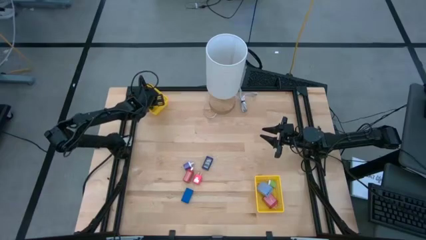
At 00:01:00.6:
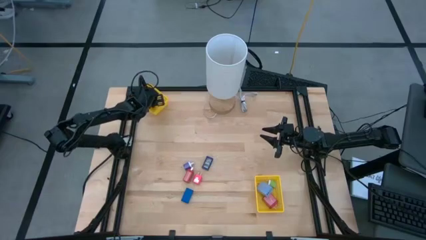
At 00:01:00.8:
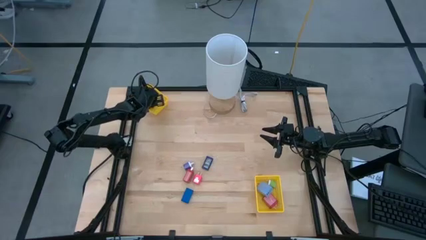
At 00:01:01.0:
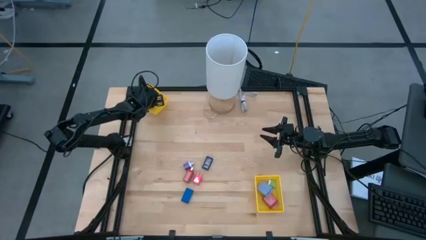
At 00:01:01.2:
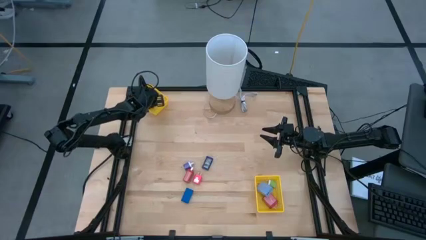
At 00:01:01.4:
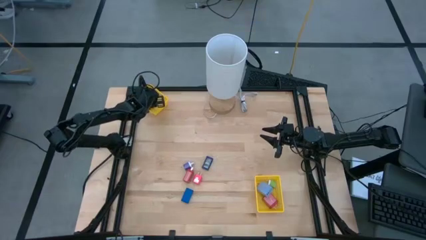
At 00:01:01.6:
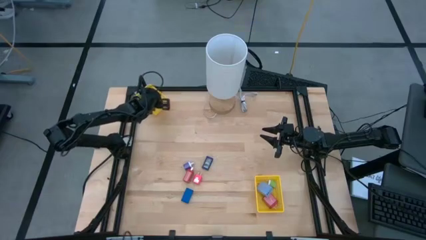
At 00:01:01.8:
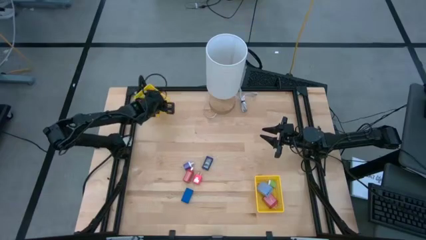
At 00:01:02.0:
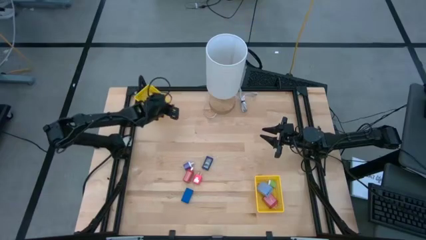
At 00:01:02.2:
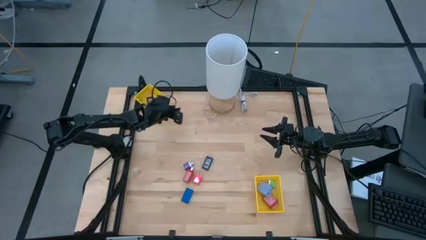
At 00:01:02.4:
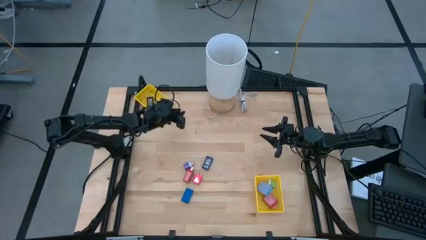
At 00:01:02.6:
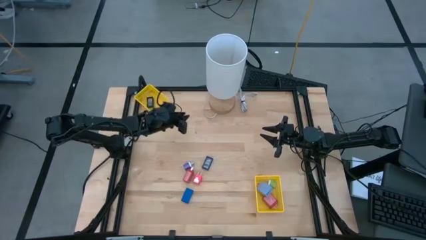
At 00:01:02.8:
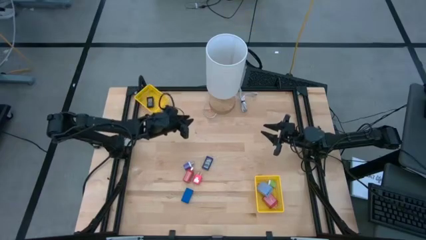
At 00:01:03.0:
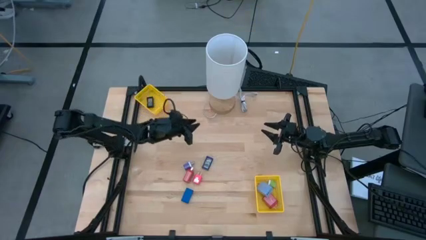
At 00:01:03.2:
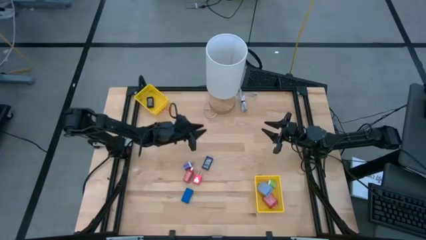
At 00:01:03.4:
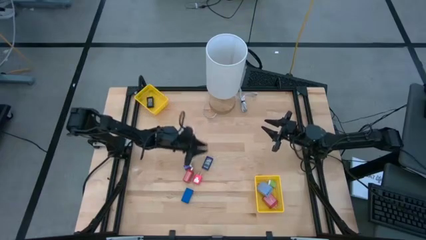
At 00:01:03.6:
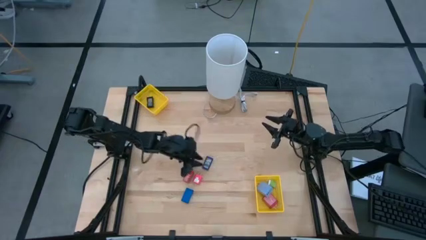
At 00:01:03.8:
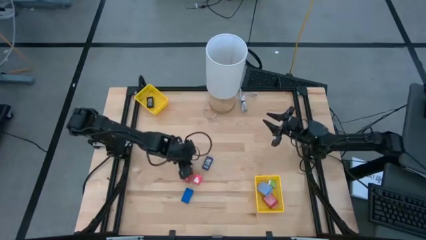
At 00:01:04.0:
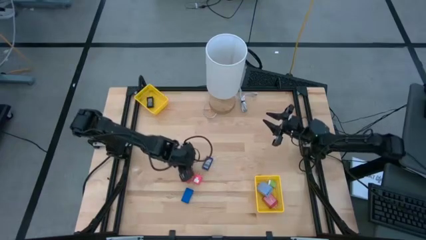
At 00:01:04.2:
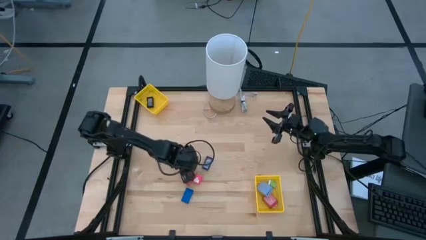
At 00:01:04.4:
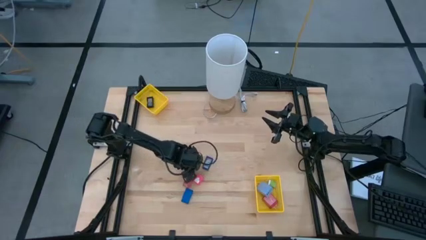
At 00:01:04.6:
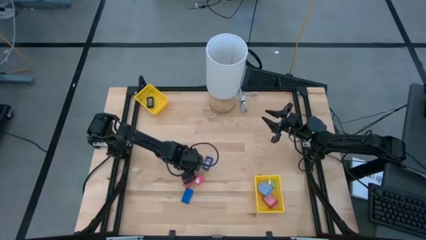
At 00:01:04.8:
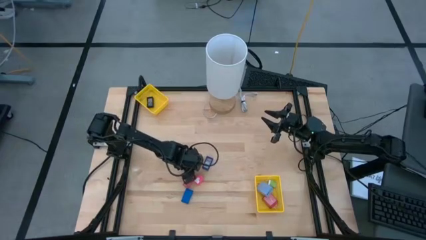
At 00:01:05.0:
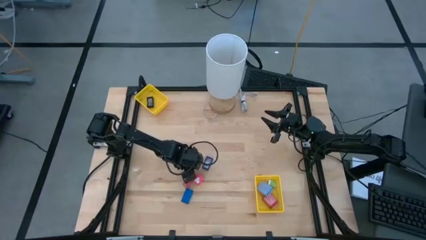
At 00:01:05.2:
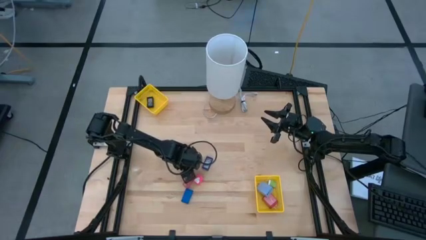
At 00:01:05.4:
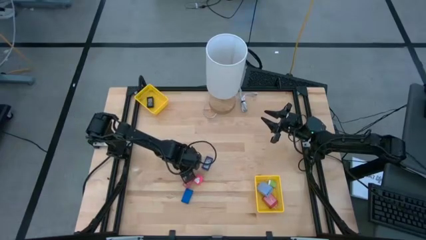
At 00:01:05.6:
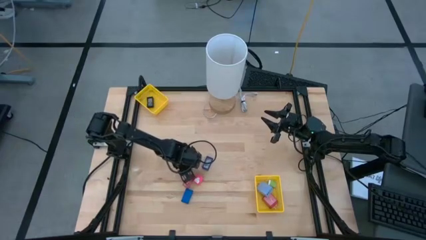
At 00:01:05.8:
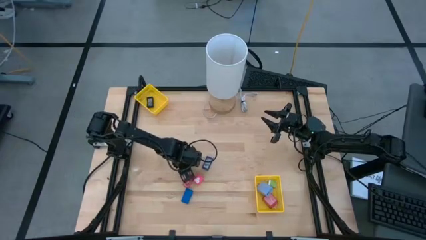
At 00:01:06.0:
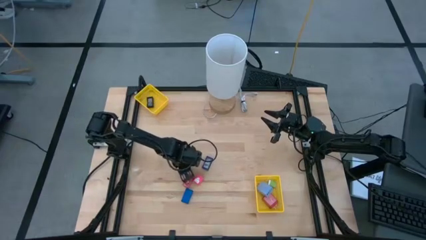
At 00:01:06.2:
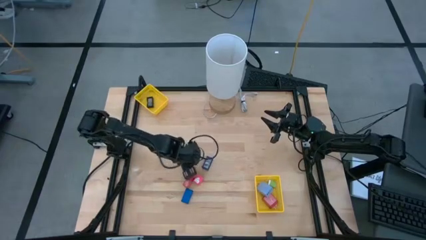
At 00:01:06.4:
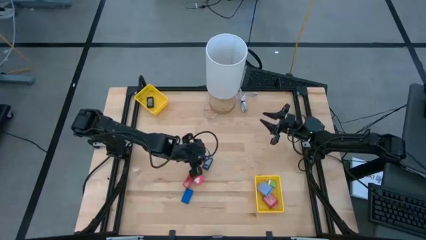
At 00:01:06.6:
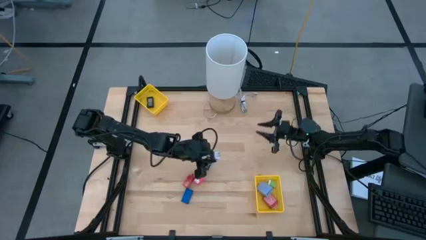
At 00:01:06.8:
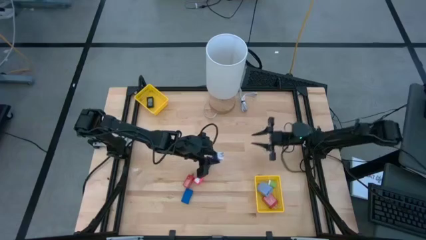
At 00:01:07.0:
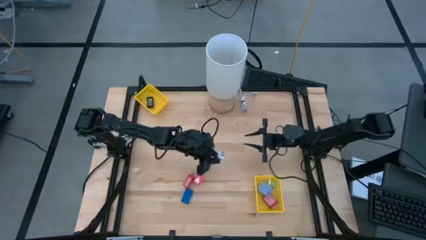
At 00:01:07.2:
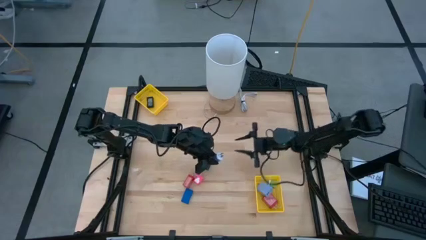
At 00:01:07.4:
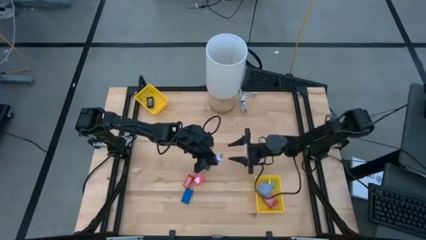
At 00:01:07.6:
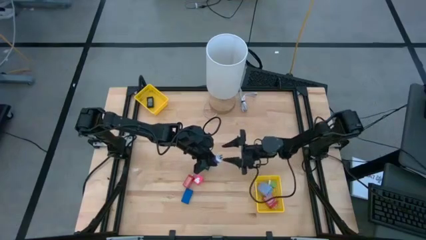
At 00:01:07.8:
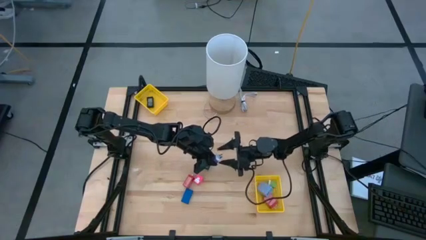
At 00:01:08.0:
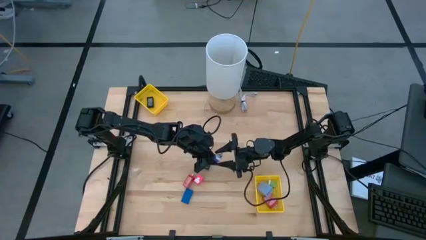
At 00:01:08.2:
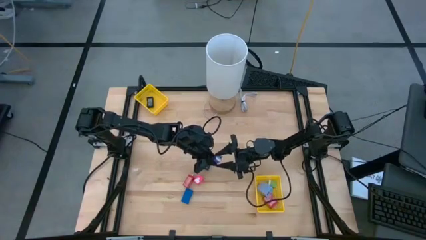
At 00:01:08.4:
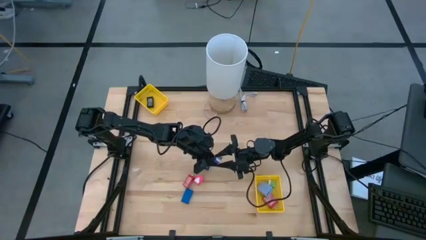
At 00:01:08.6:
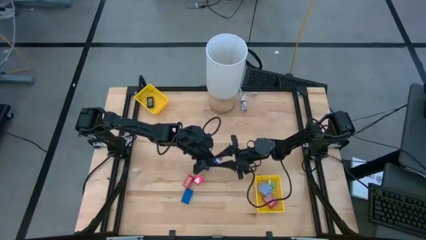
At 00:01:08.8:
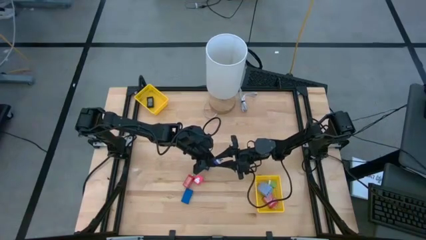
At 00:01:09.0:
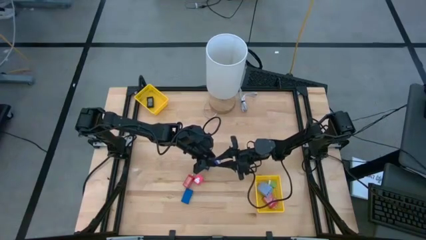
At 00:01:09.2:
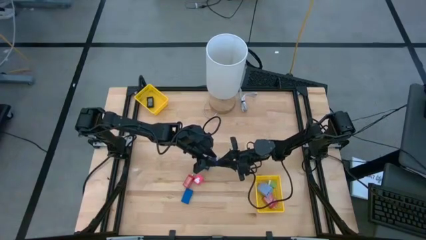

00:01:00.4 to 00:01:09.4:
Task: Pick & Place Office items
Put the violet charger adapter into the bottom yellow bin

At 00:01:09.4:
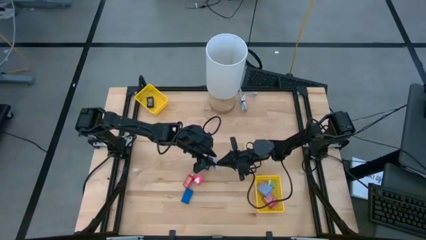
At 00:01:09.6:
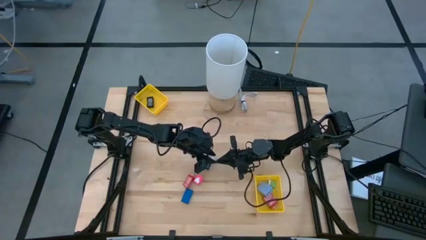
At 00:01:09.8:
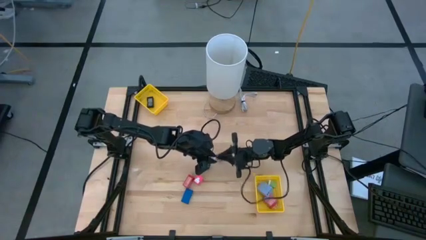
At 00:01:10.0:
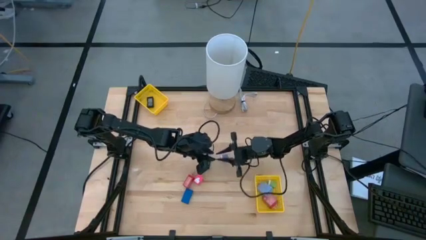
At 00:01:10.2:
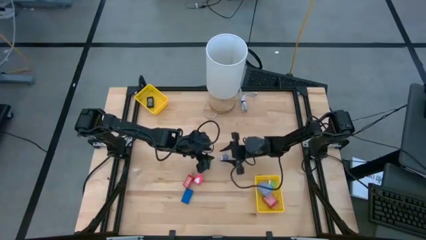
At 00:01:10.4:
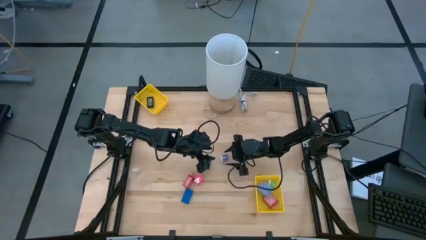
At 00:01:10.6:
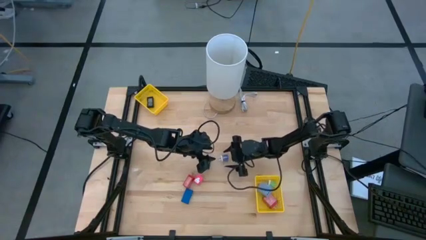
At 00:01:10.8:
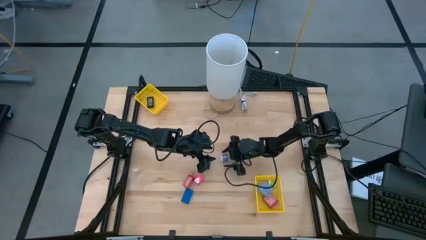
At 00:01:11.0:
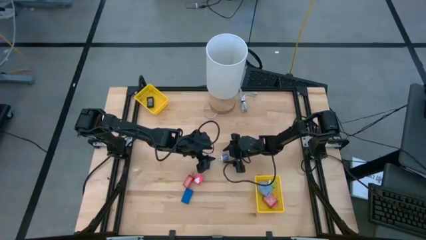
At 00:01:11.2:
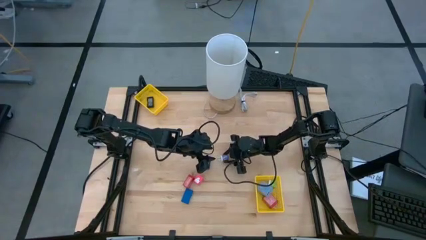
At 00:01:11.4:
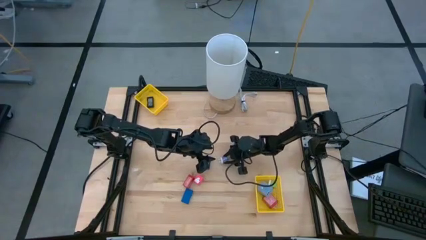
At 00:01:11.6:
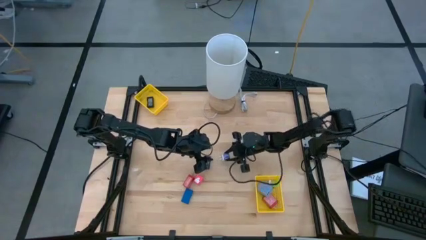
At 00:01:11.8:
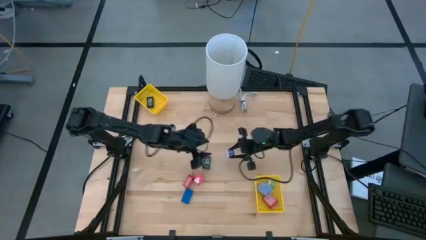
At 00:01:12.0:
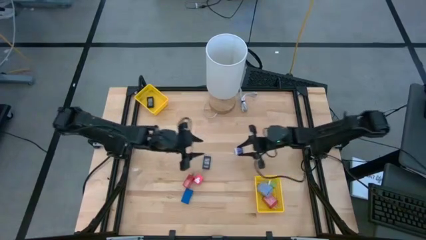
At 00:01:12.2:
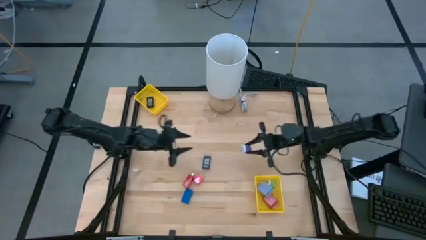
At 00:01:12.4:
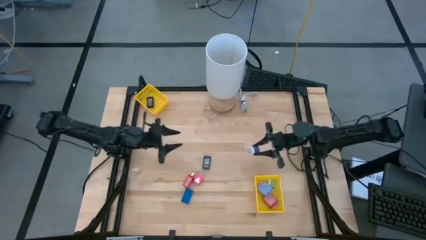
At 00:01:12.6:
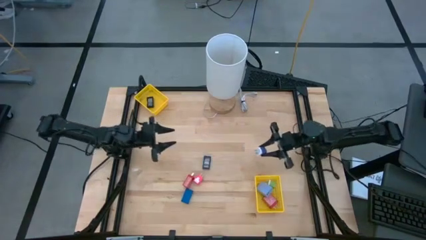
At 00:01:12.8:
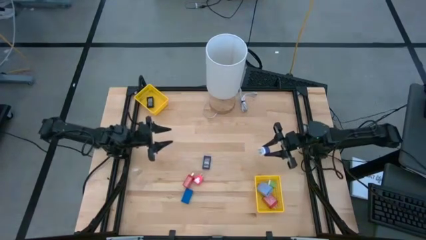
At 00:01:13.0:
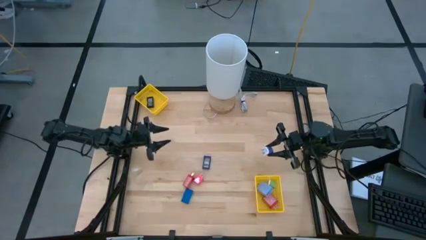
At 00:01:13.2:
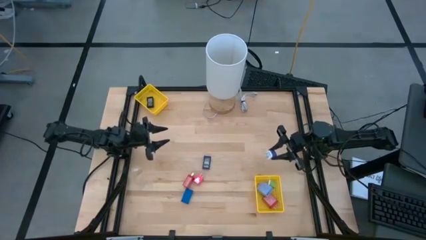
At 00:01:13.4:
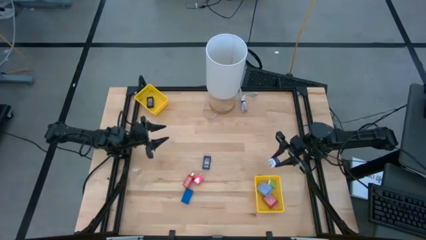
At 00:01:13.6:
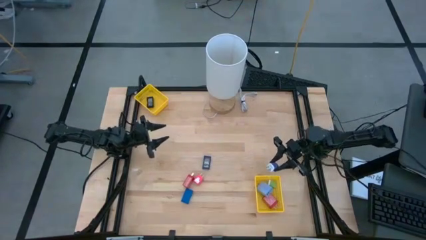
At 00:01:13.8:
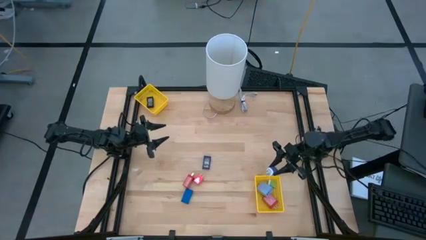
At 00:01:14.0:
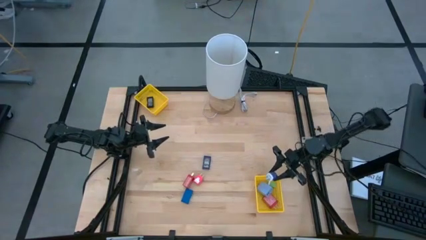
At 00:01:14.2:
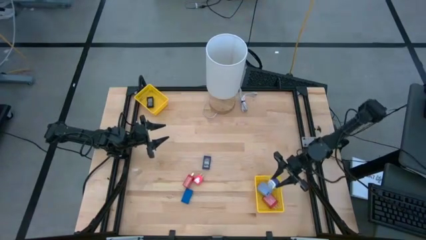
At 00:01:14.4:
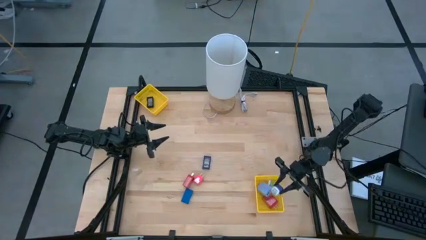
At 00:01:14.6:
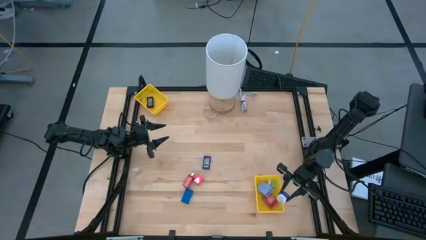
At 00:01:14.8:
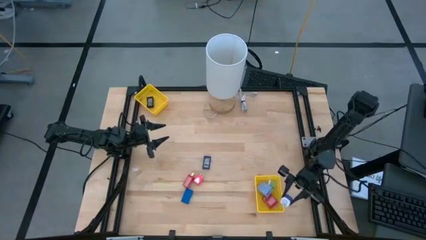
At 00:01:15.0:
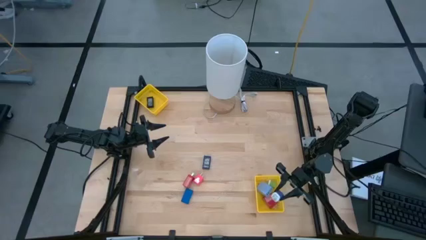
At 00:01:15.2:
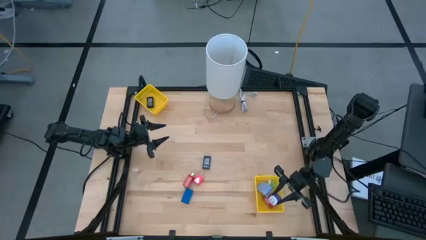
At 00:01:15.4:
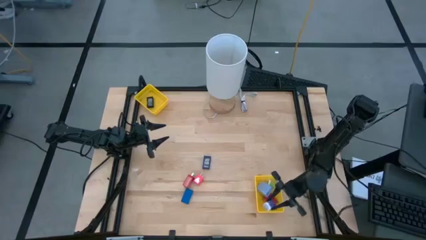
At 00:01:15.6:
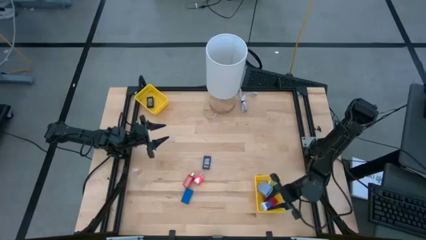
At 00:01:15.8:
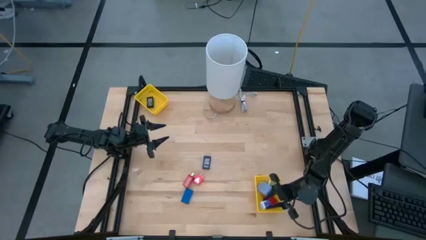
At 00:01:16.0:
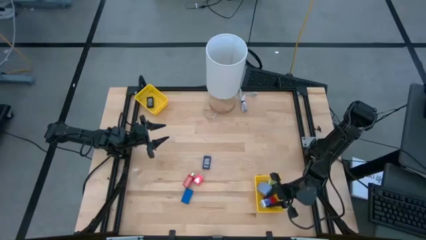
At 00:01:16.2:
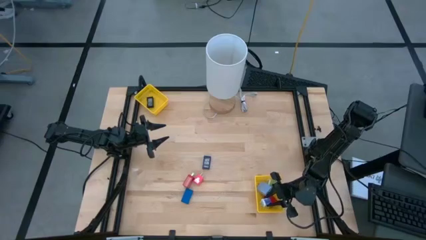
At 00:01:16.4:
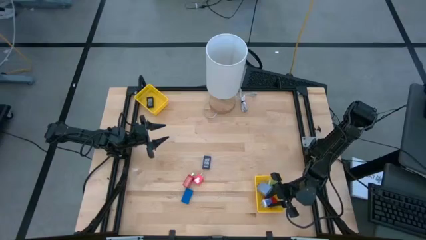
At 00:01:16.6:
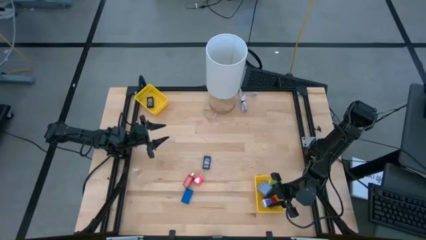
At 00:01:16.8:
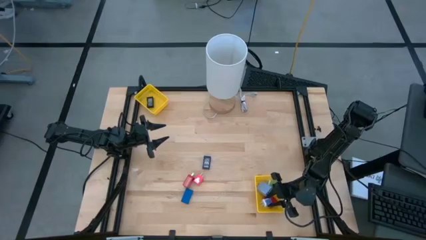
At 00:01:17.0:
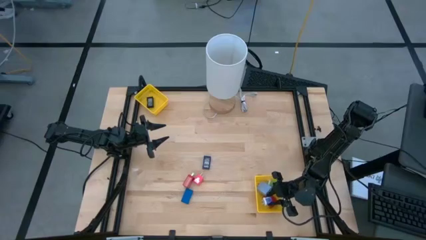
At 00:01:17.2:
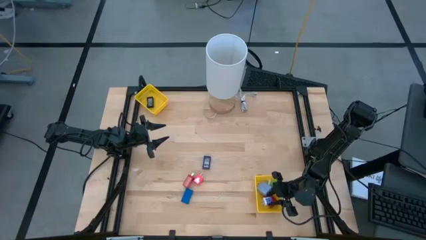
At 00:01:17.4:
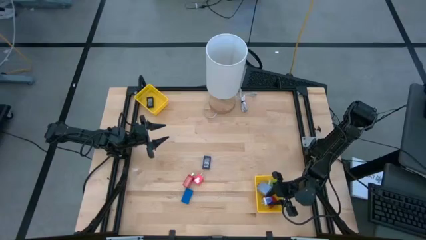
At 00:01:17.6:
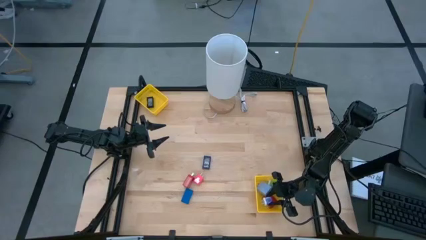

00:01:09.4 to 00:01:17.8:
Put the violet charger adapter into the bottom yellow bin
